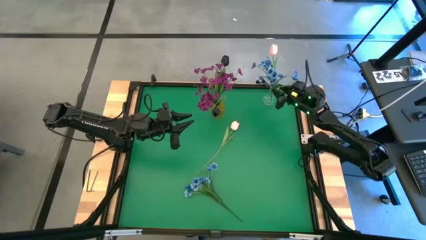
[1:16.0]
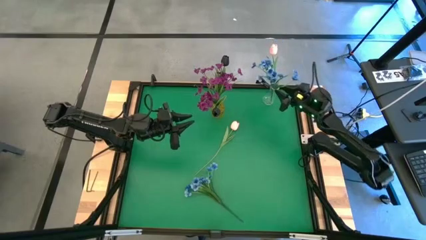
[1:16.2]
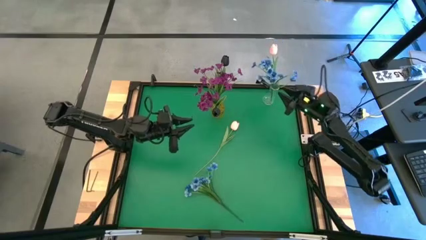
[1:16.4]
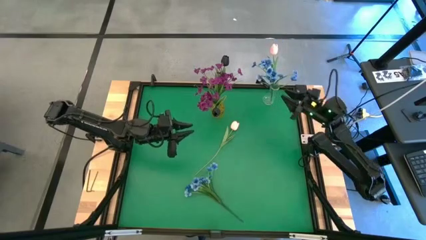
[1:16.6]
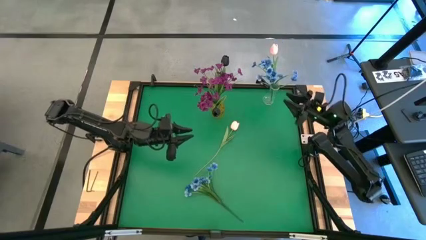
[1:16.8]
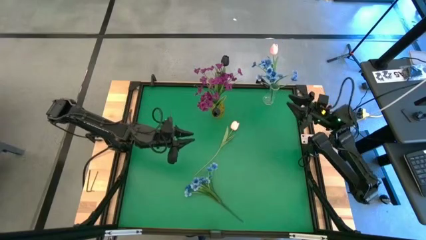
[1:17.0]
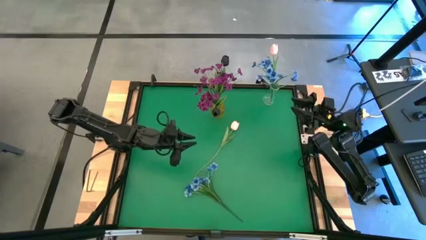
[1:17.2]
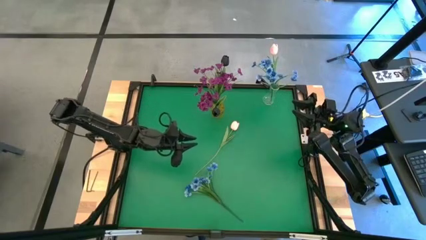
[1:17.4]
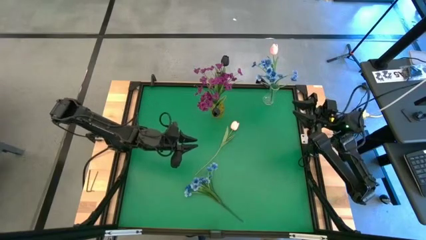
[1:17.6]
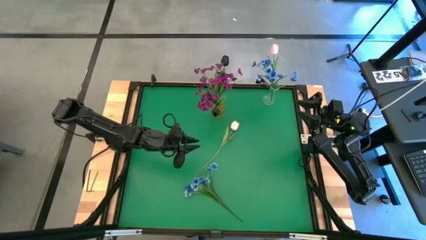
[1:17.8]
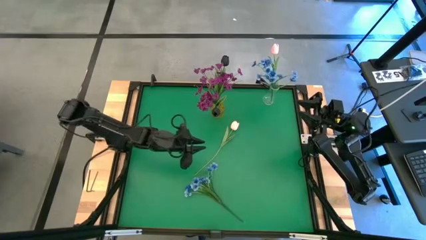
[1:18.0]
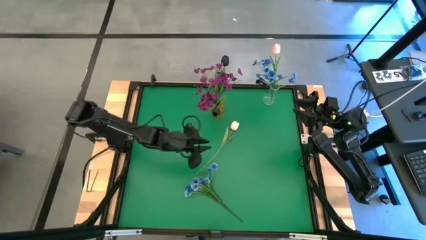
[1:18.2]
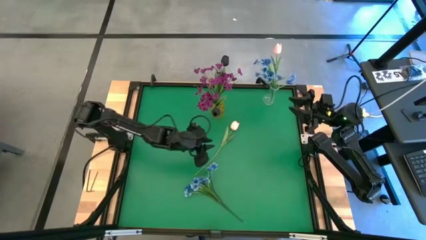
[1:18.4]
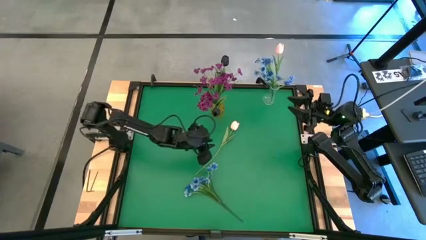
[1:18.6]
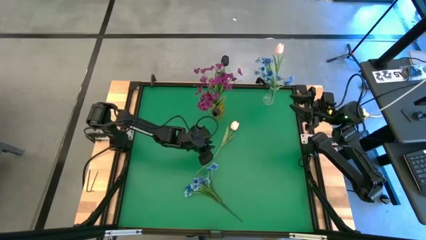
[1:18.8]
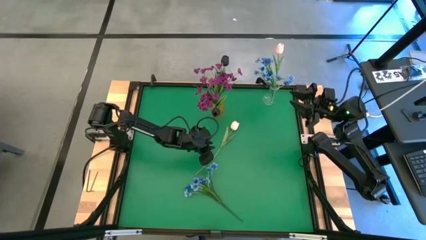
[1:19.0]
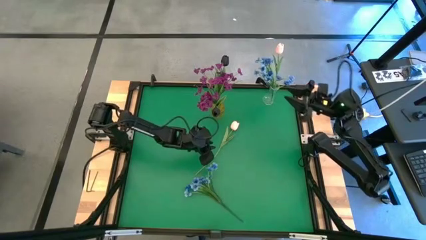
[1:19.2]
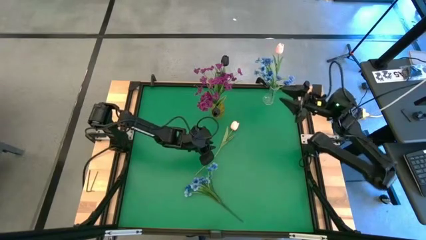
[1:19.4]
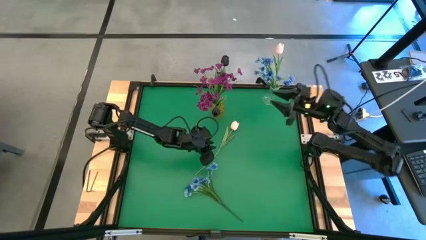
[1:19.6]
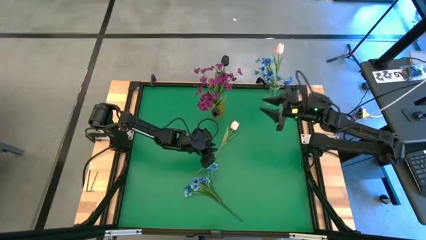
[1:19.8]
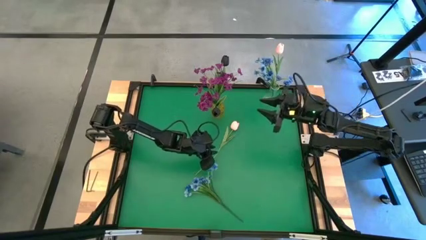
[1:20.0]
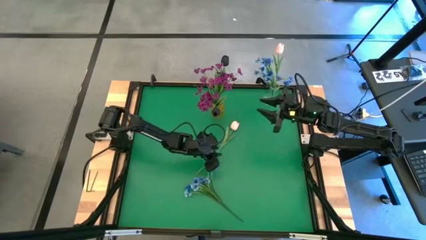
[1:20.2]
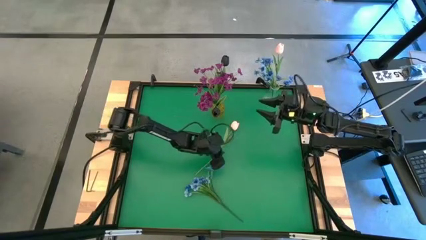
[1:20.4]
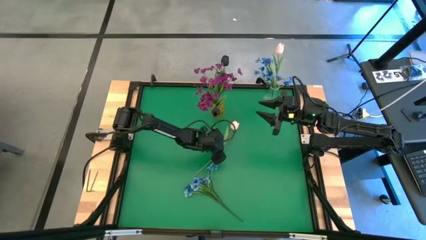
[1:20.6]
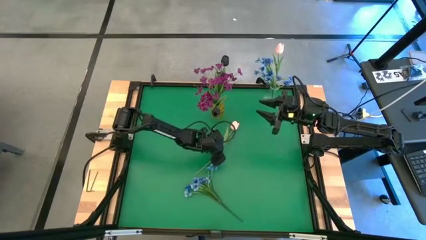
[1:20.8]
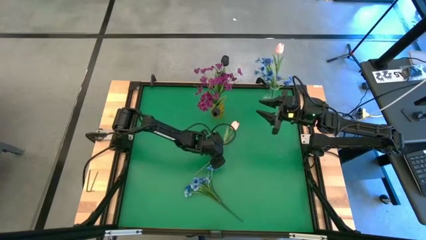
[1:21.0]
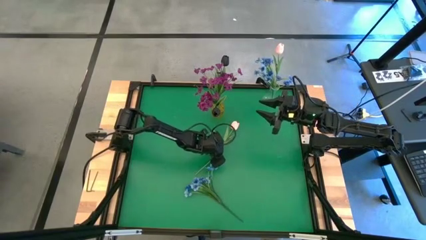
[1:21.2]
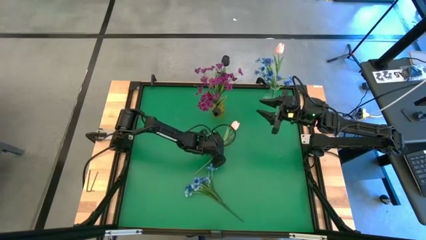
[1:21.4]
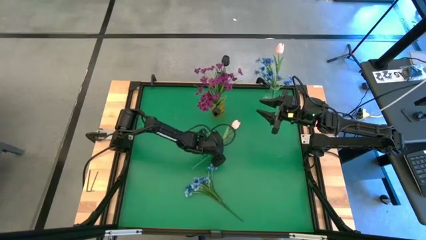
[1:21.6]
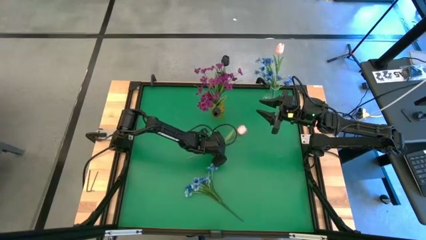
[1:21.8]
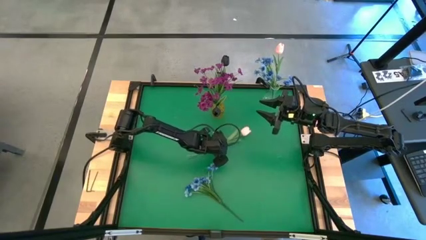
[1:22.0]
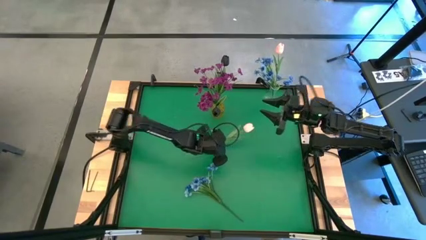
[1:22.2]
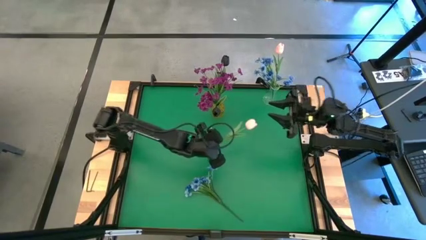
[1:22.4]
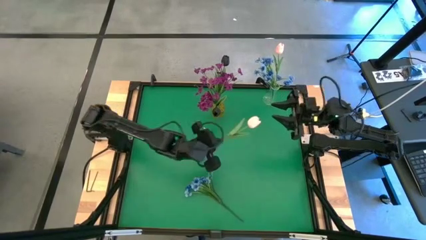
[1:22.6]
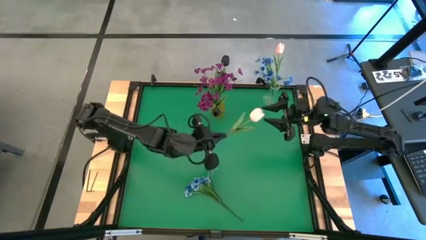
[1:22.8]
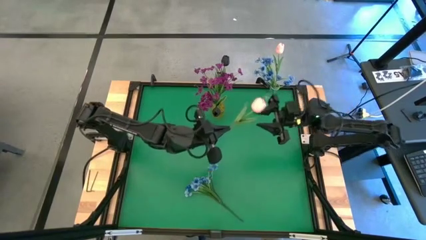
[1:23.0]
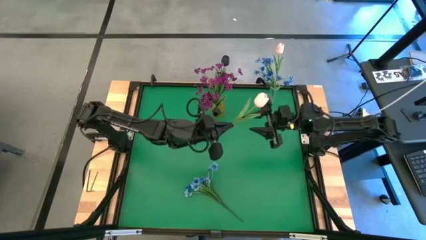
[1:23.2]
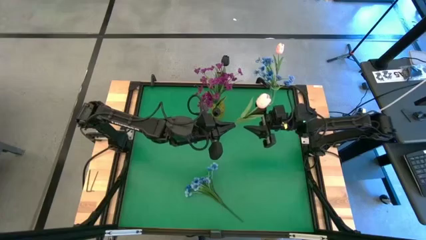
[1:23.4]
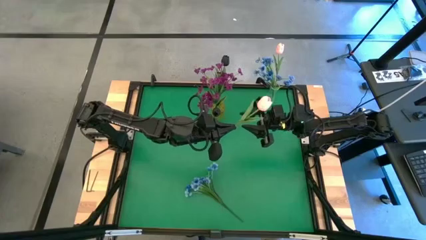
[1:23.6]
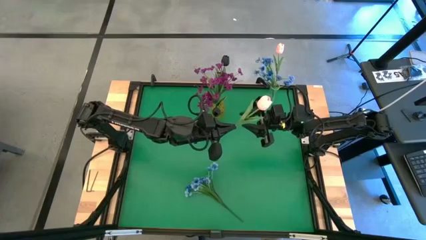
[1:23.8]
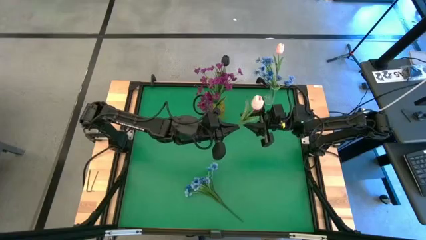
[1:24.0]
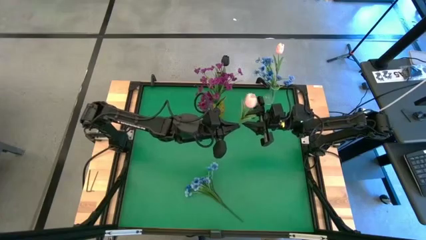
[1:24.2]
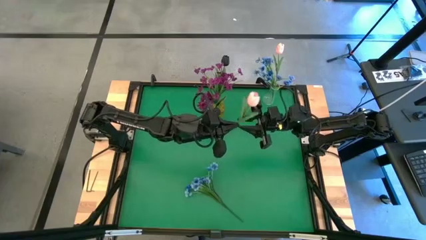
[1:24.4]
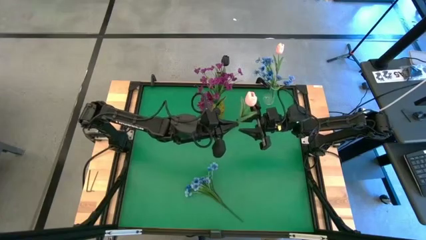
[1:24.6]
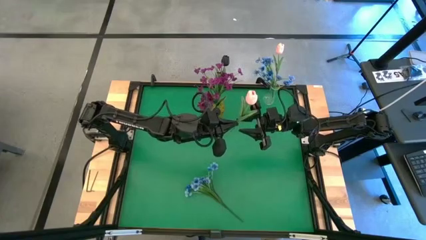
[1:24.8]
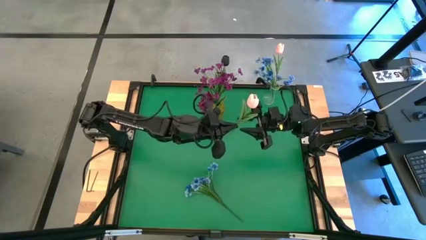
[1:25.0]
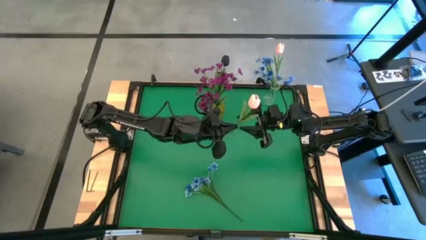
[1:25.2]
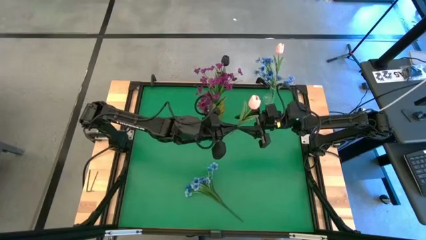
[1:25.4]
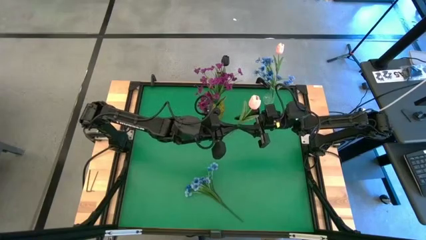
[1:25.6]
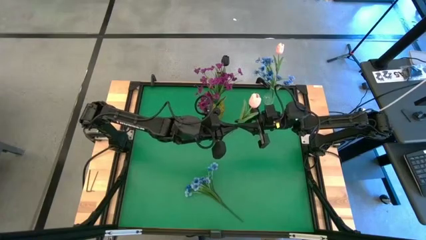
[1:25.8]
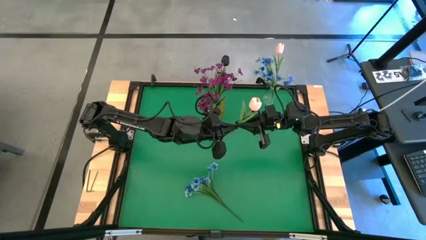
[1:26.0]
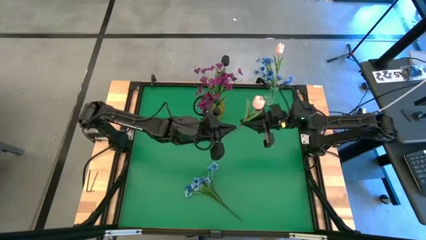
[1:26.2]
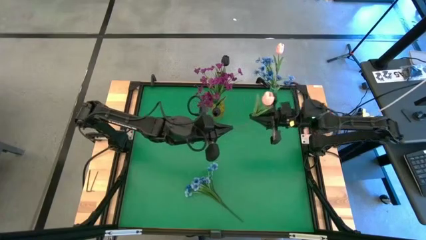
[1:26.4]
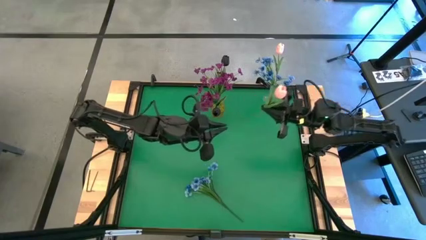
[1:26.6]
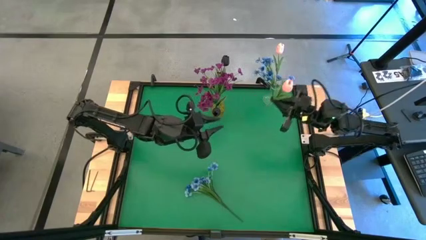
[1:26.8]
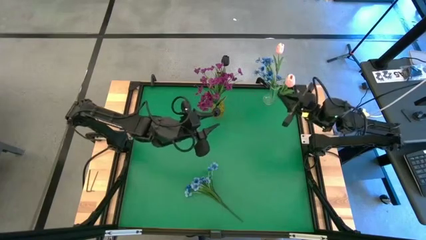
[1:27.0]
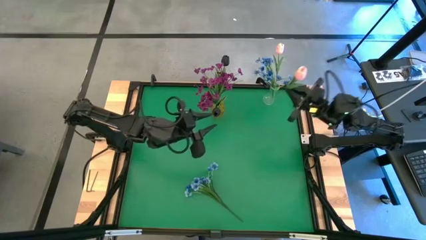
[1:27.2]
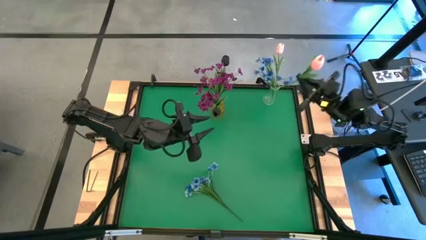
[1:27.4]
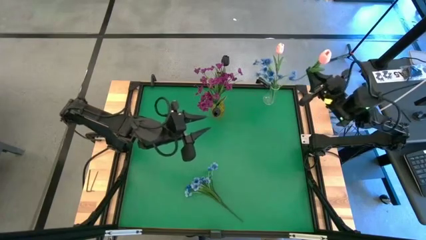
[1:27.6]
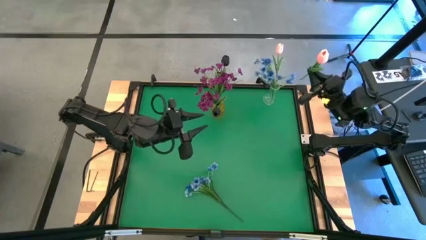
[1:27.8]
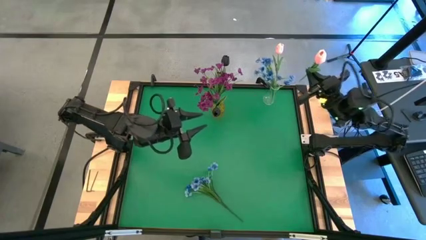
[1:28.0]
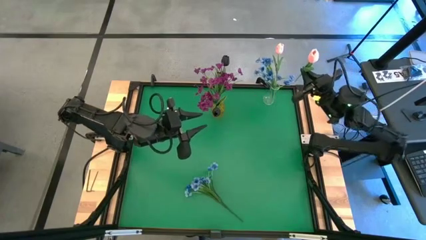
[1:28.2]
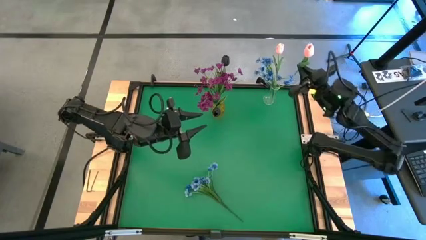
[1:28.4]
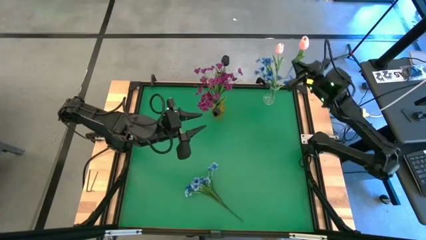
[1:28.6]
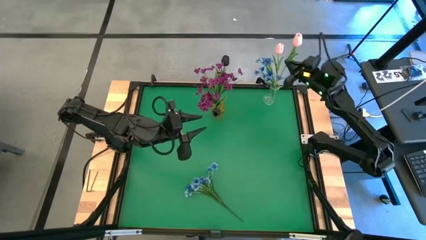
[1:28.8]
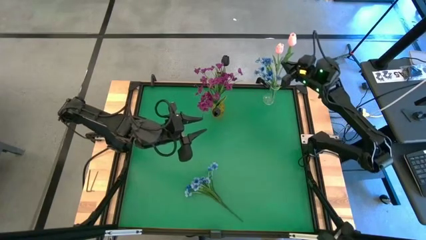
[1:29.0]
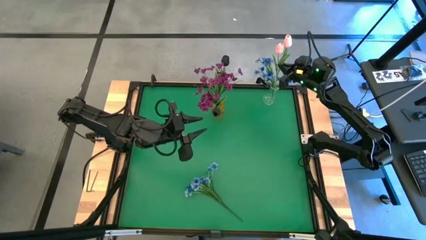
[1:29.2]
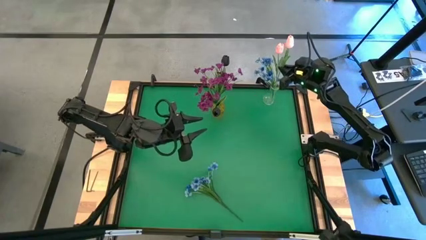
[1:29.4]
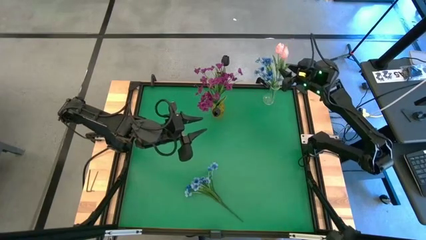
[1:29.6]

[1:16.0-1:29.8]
Task: Sort flowers into vase by color
Put the pink flower into the transparent vase

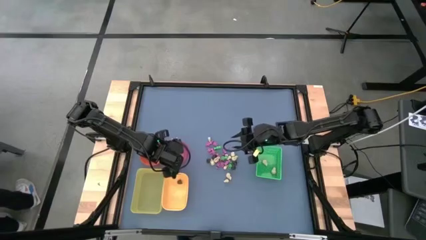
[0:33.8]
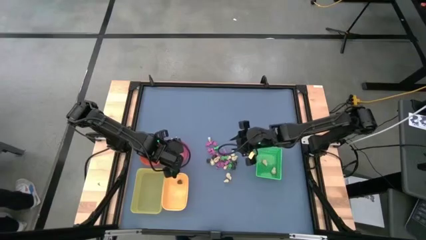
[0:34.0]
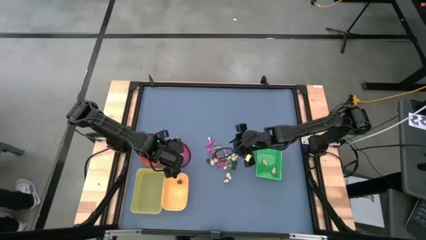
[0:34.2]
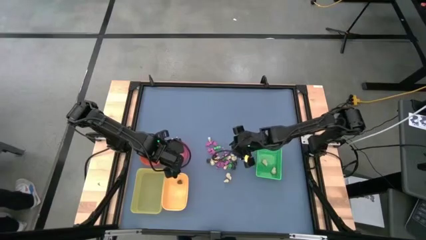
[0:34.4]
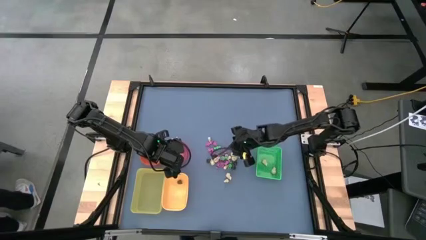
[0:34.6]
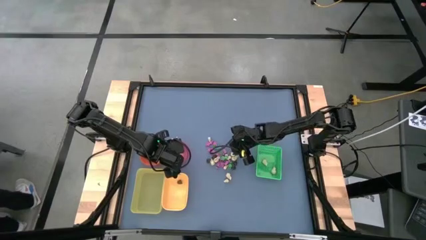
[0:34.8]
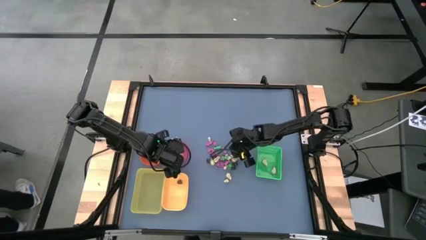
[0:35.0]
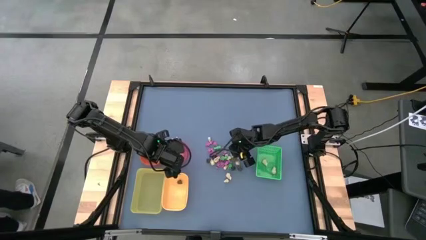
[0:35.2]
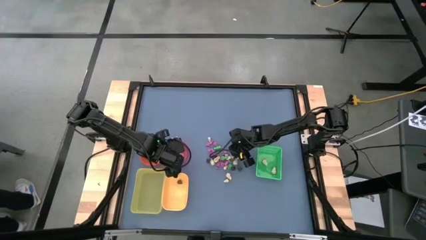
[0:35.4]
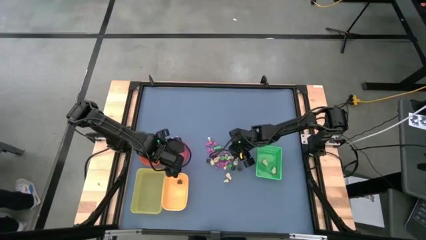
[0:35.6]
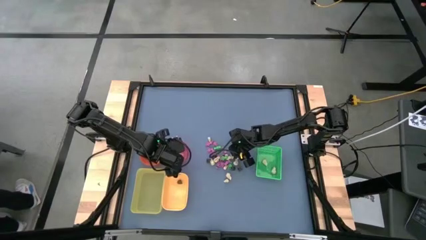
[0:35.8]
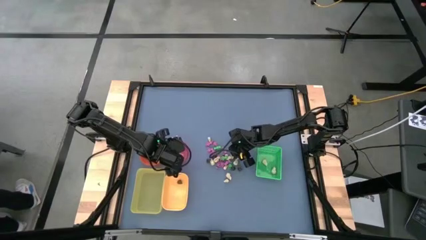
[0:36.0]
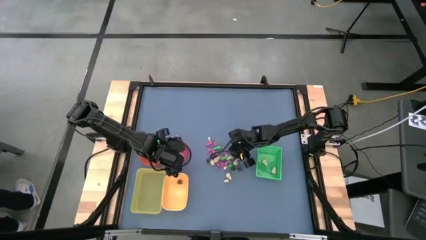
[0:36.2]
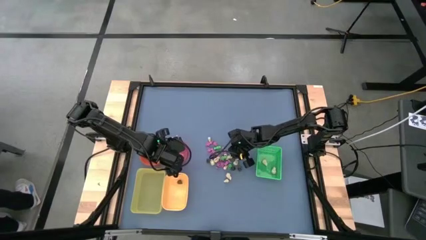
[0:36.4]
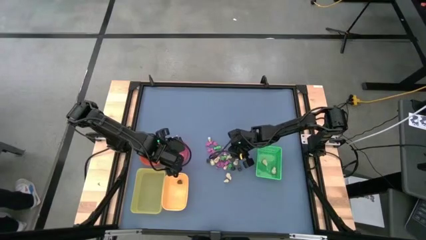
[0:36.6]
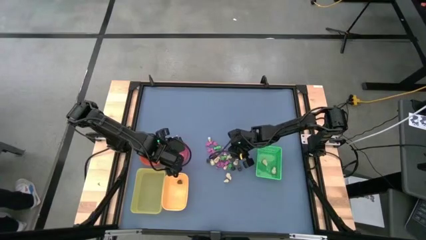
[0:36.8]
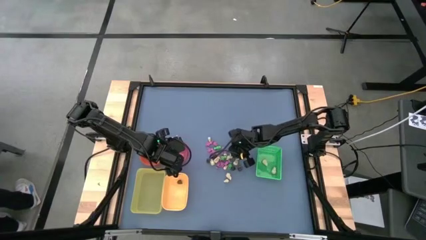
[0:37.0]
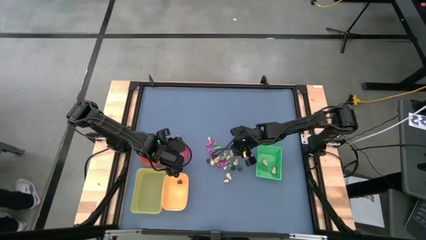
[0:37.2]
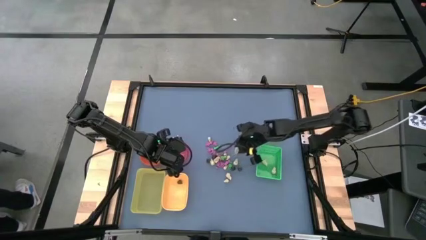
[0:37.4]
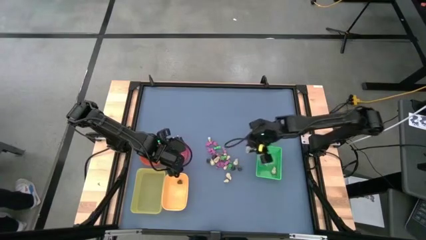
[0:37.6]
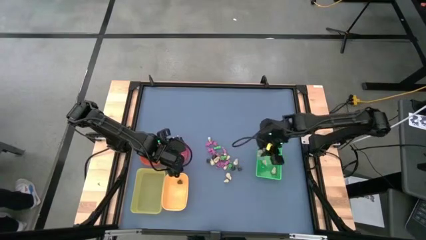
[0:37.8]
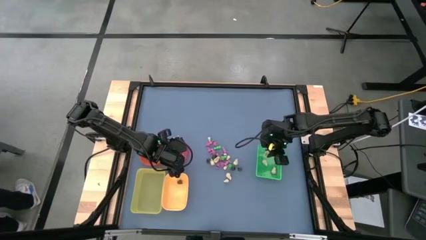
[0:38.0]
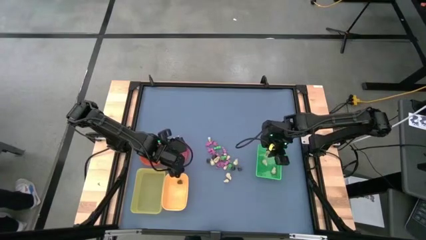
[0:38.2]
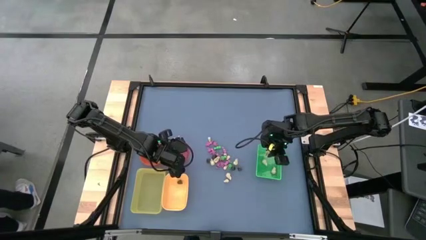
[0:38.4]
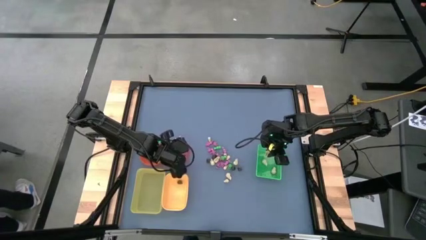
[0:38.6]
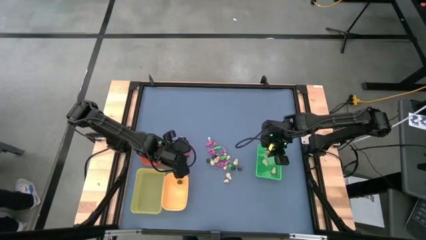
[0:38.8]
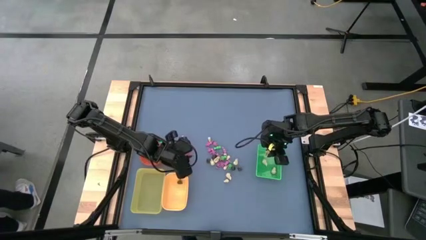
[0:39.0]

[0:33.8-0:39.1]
Task: Sort Halloween decoration
Put the white skull into the green bin
